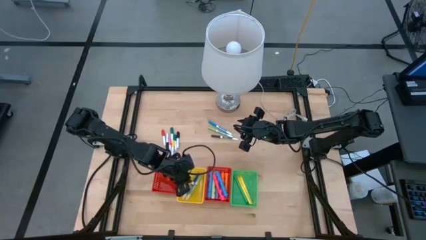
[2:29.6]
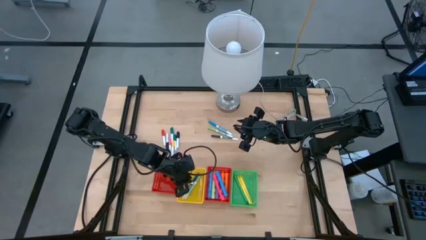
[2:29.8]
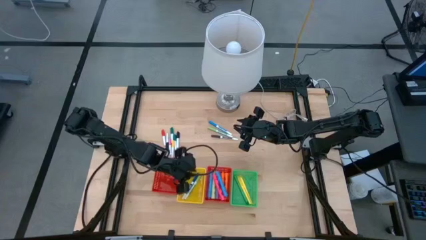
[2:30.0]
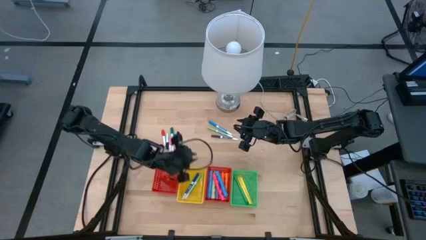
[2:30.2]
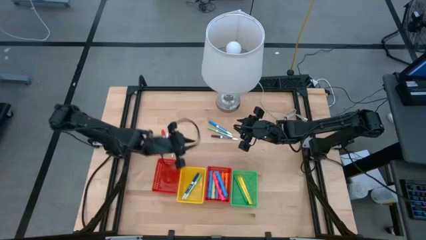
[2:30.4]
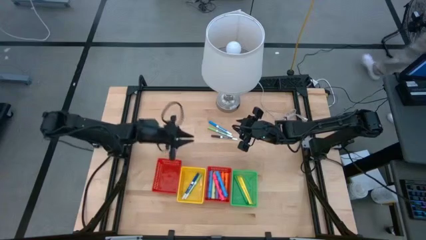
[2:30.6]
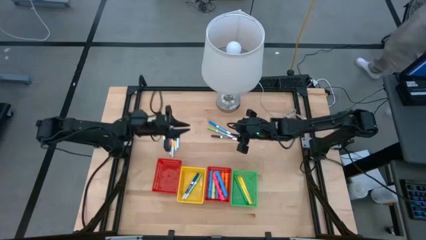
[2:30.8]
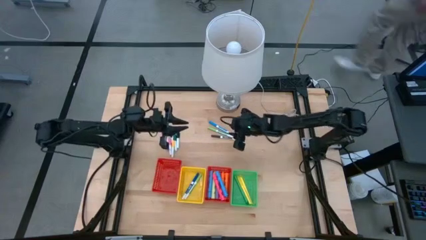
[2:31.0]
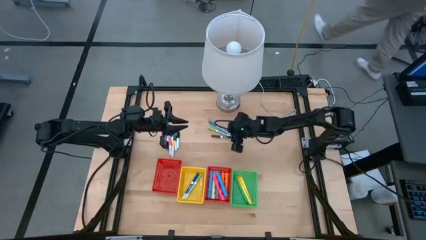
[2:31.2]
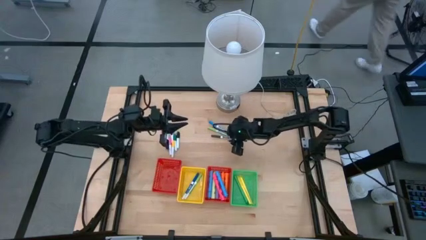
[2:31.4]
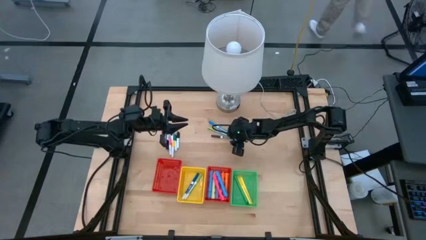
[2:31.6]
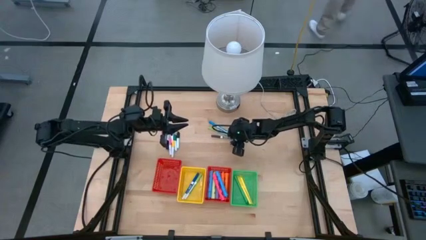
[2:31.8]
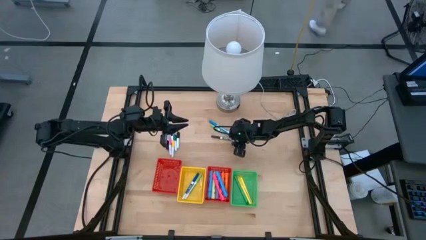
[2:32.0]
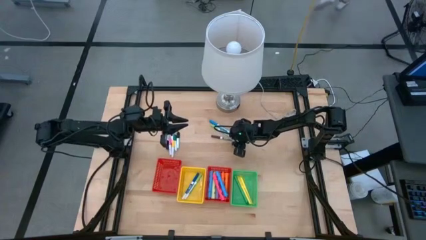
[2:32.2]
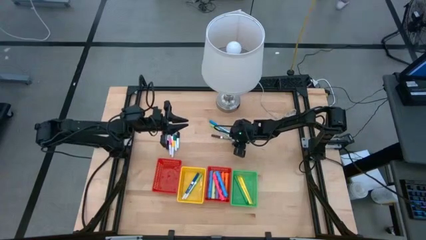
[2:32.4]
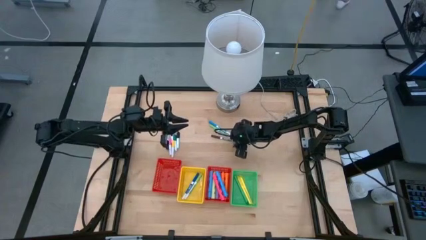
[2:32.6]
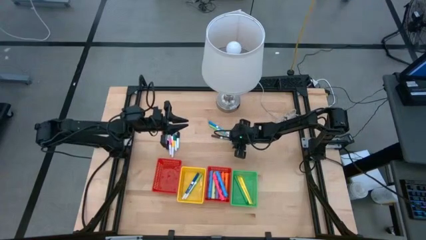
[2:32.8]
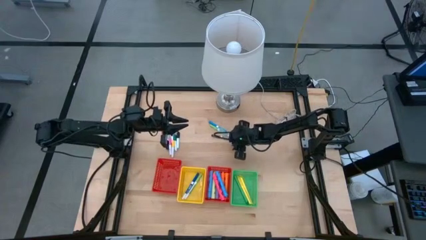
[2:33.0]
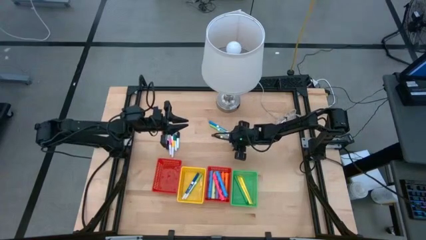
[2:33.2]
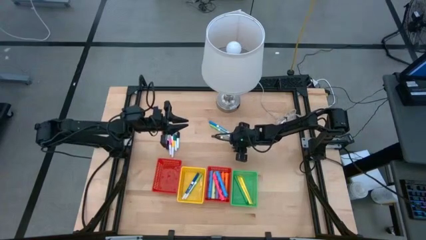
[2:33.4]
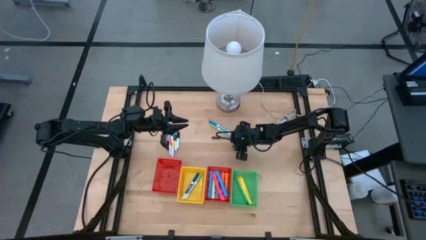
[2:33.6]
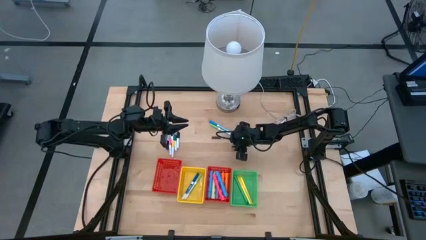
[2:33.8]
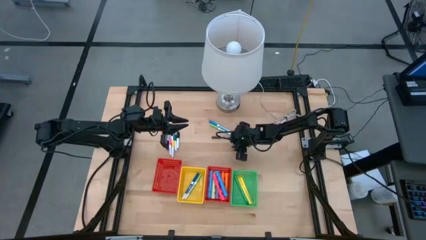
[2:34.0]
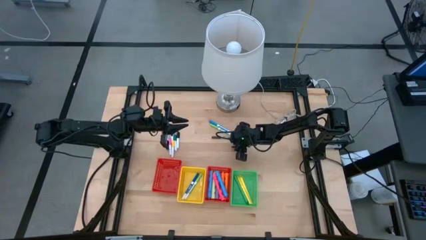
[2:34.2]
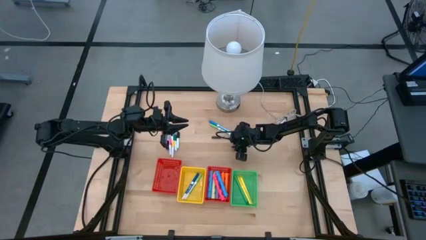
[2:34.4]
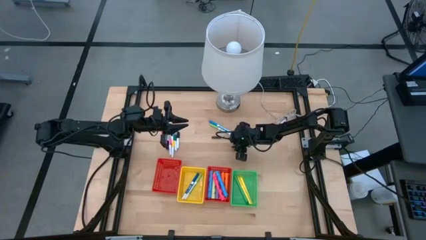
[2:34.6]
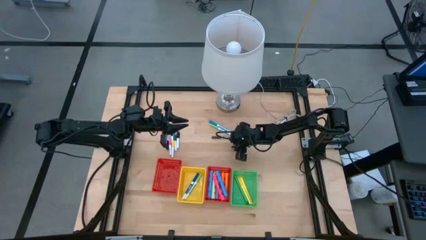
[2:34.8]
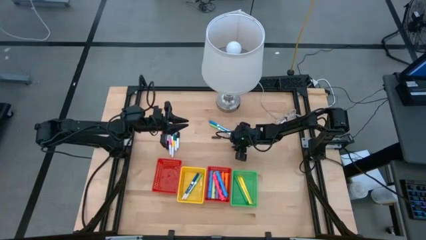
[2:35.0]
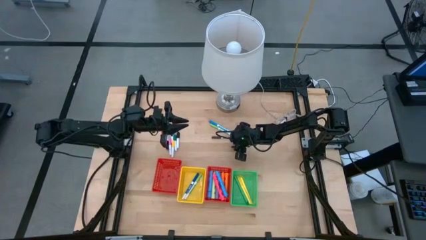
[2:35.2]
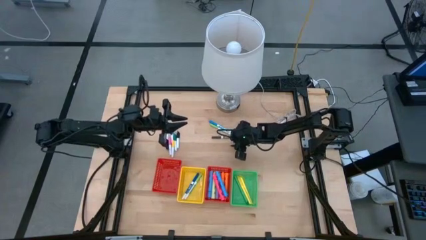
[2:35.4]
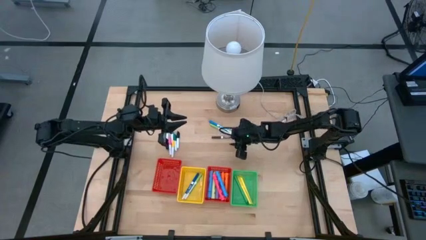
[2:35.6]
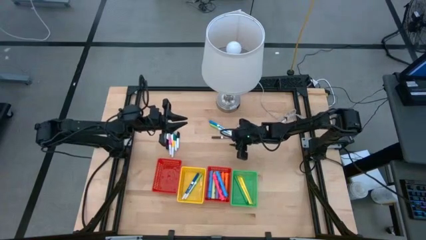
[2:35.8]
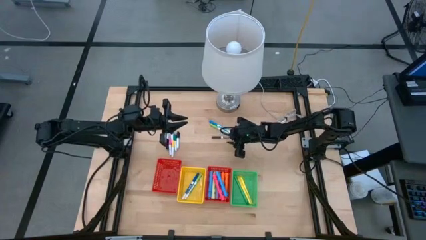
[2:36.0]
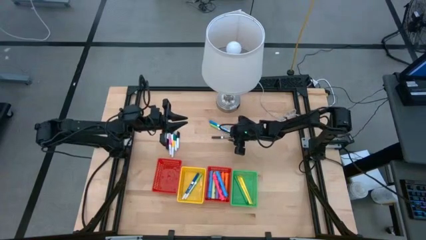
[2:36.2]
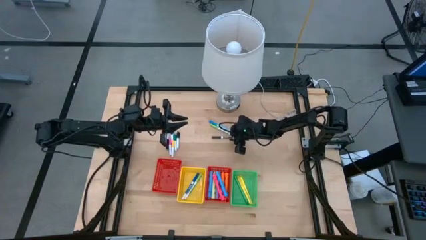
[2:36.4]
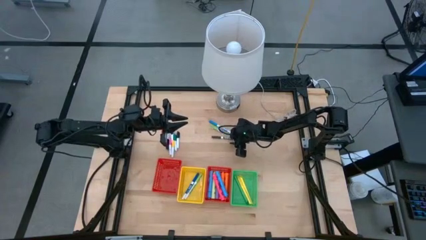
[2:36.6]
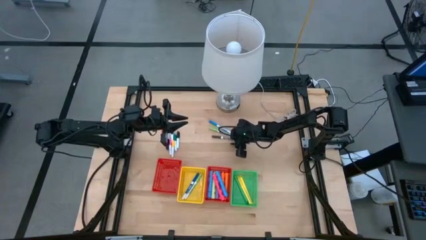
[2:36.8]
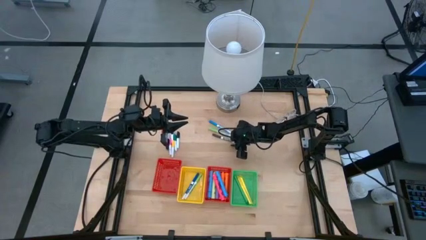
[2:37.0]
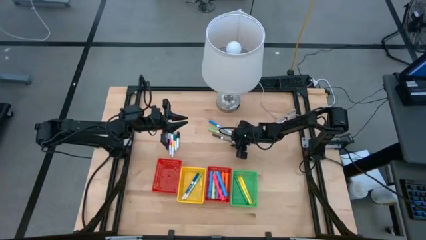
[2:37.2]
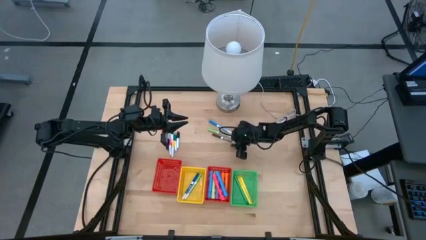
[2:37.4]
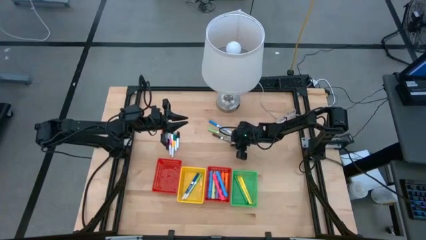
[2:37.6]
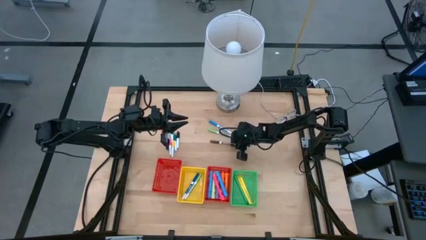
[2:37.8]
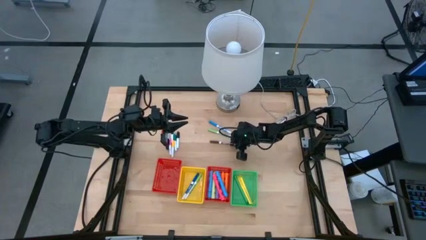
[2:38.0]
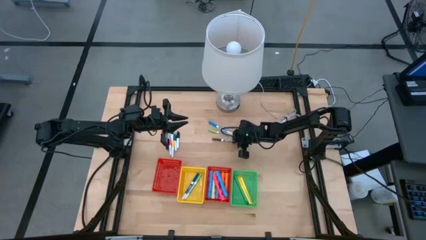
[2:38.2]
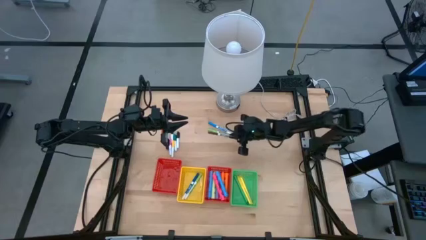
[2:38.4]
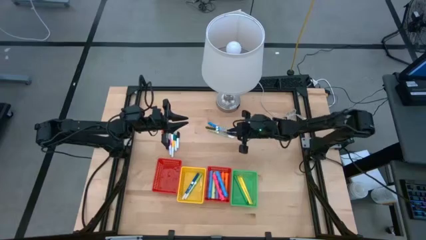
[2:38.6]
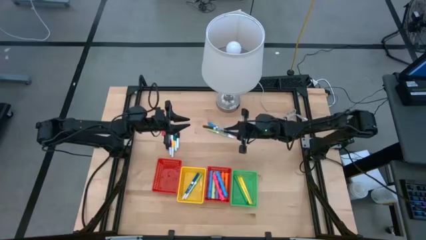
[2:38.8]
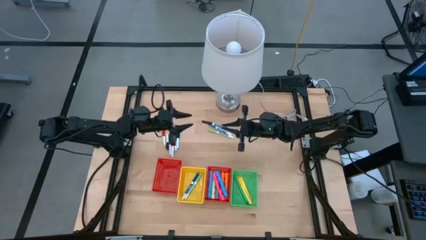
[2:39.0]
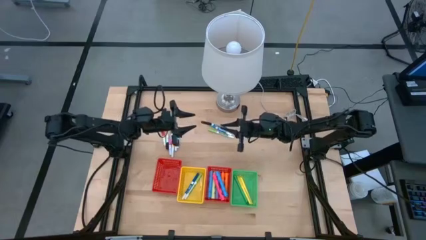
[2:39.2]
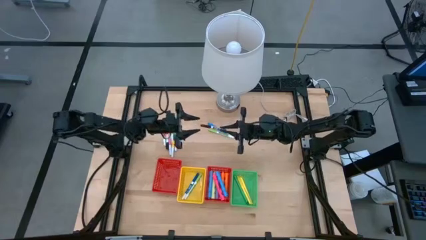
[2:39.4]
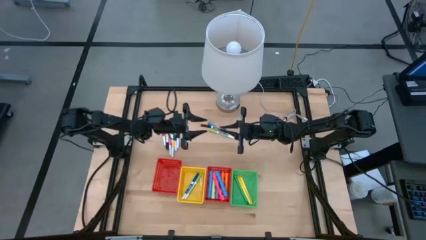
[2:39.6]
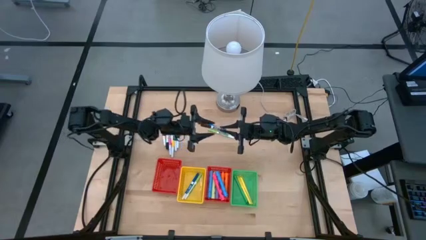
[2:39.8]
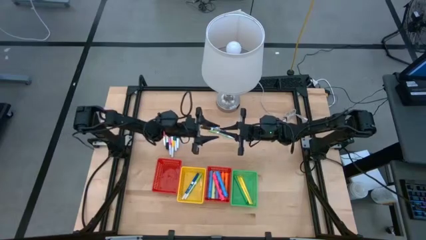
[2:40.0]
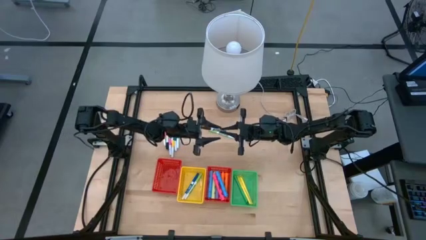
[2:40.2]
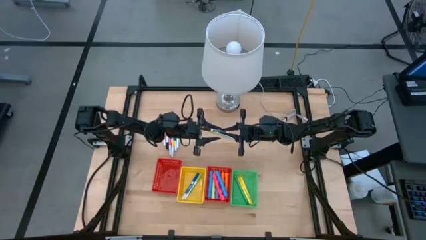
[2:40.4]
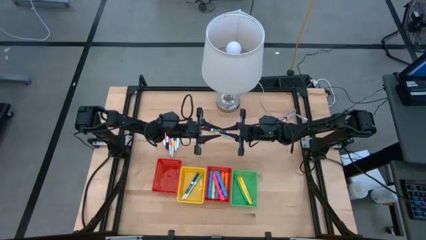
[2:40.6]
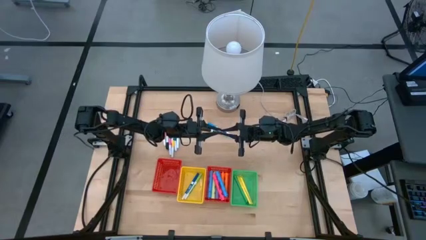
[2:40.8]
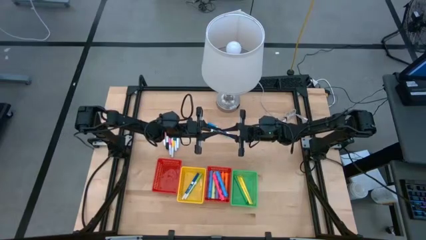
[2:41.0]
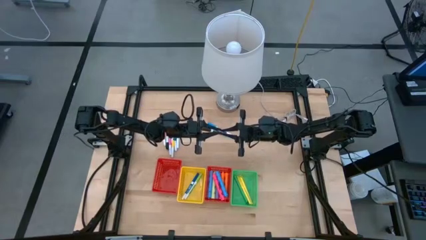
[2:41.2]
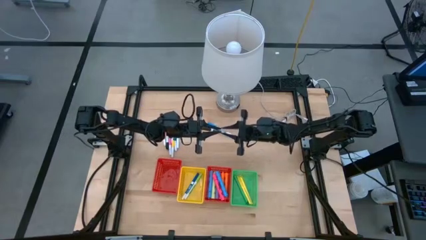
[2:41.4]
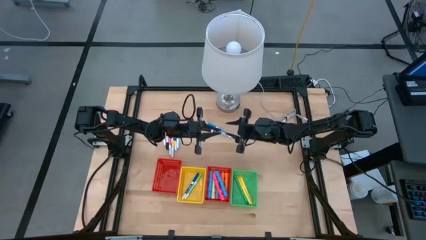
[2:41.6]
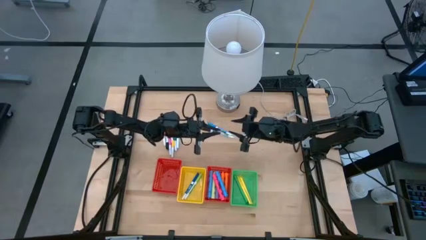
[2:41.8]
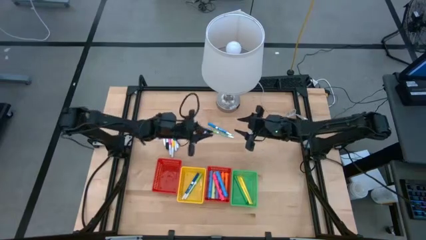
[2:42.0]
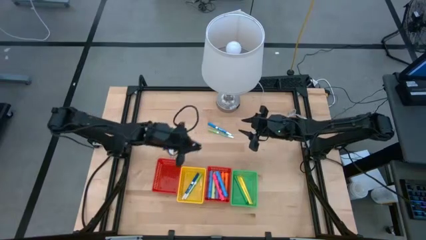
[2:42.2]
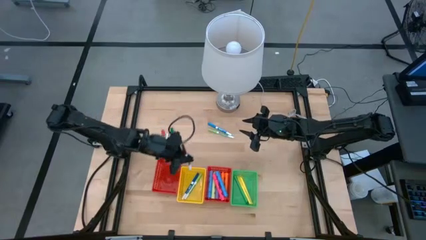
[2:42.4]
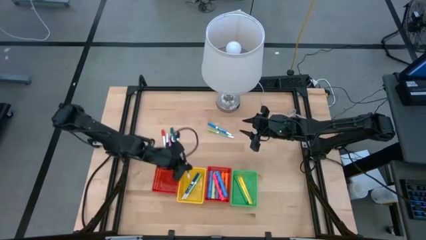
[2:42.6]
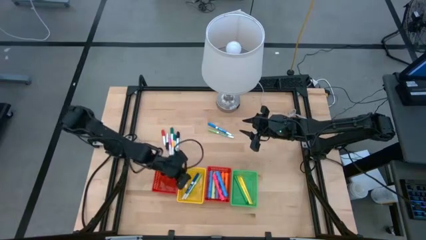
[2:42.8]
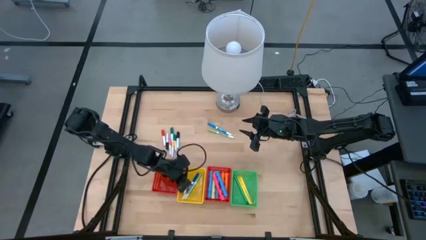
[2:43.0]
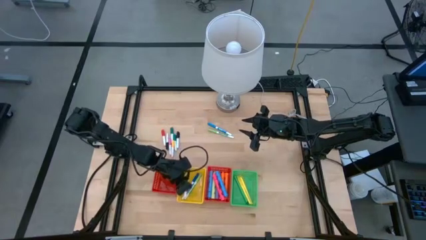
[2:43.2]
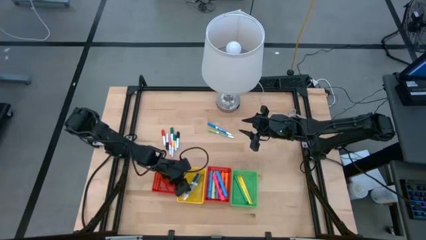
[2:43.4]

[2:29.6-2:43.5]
Task: Pick & Place Markers
Put the brown marker into the yellow bin
